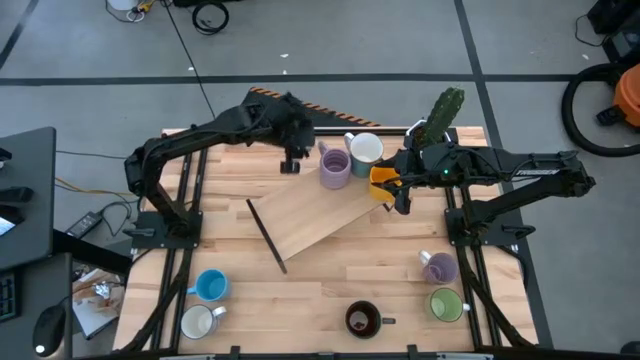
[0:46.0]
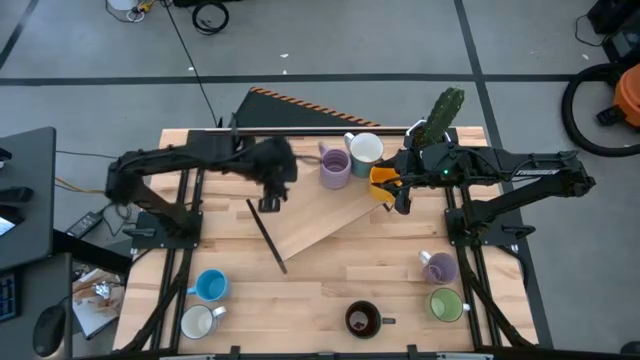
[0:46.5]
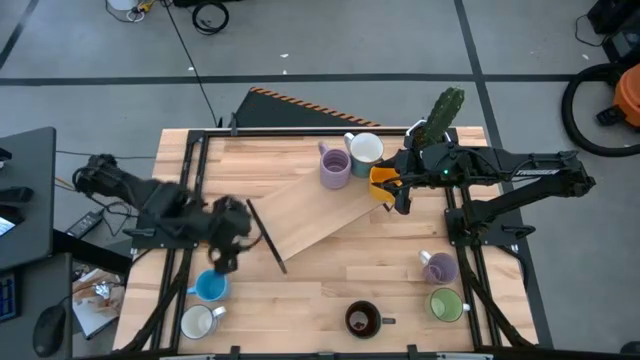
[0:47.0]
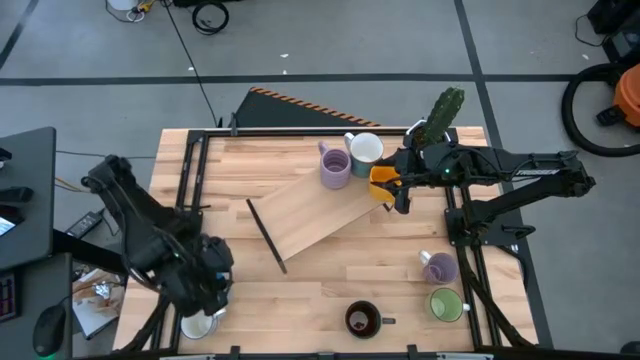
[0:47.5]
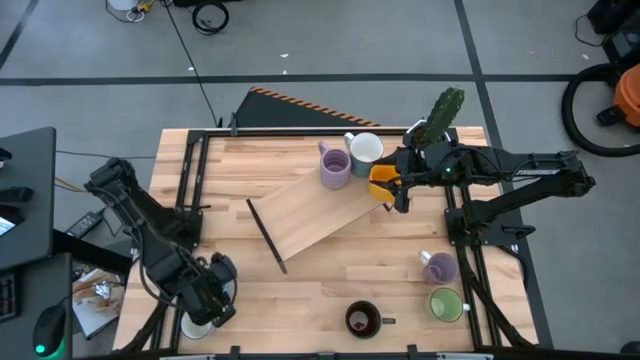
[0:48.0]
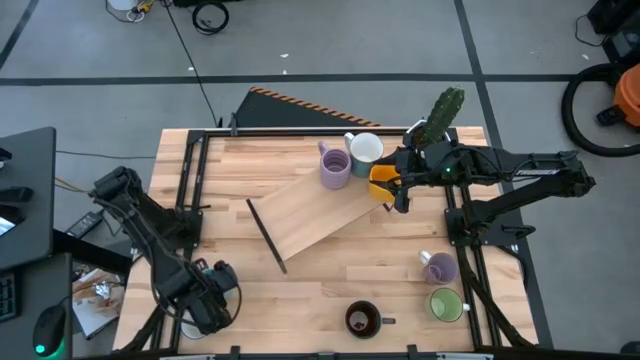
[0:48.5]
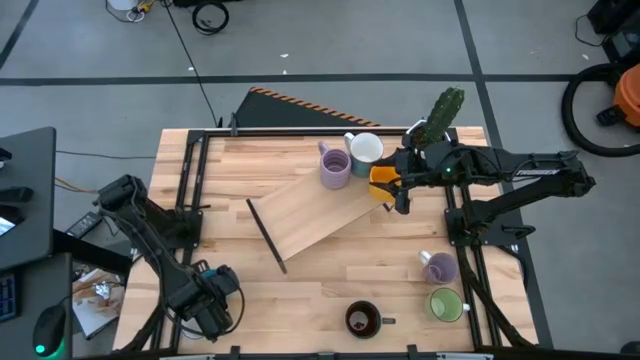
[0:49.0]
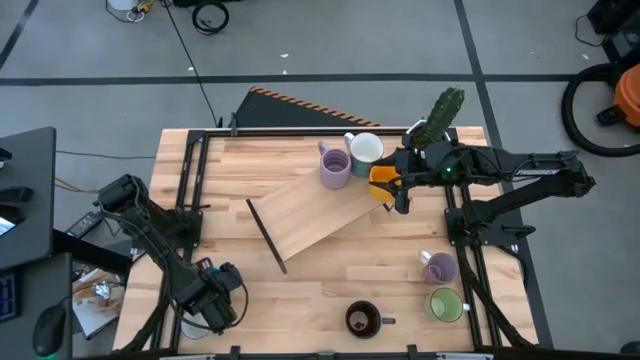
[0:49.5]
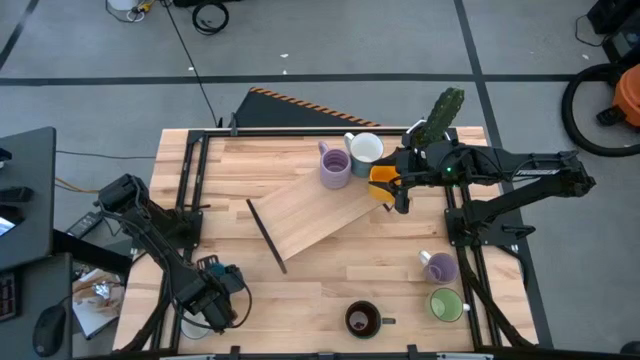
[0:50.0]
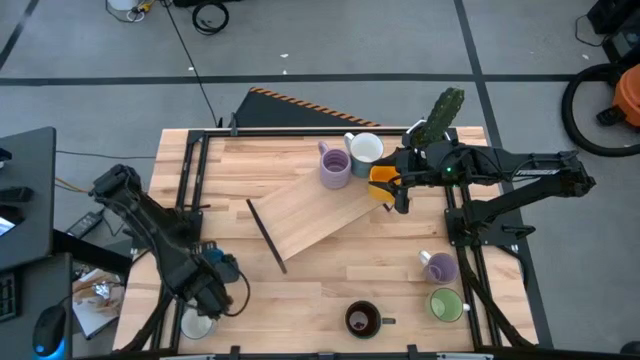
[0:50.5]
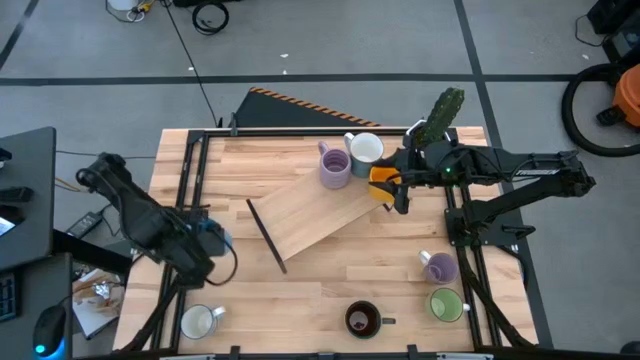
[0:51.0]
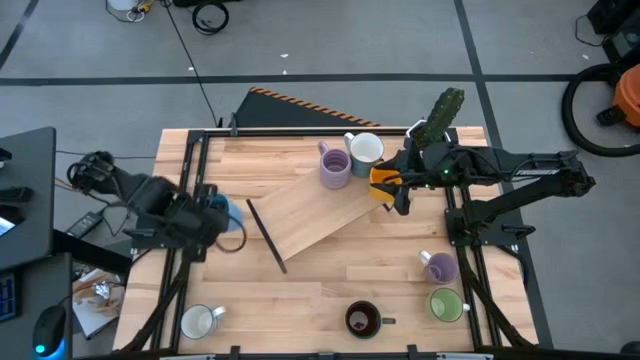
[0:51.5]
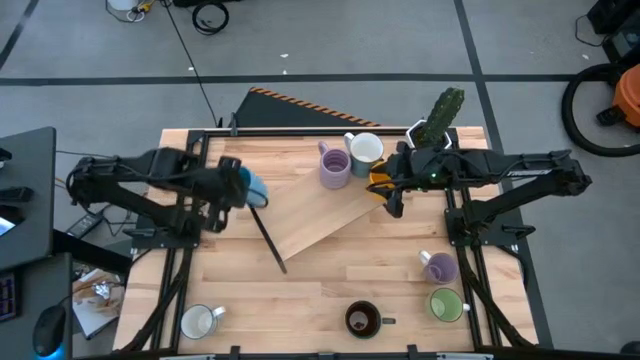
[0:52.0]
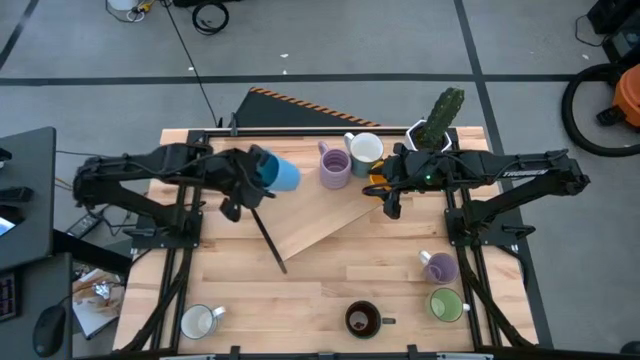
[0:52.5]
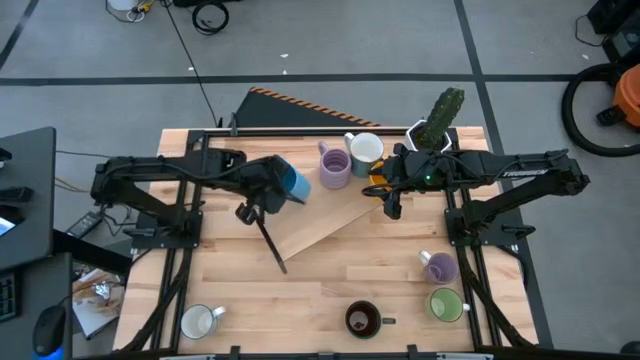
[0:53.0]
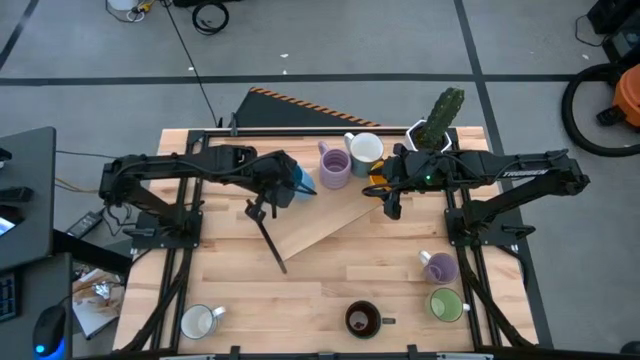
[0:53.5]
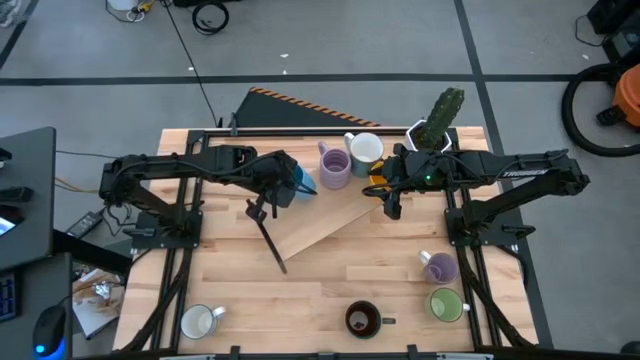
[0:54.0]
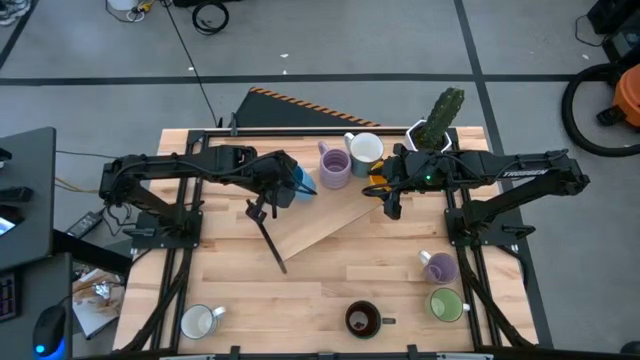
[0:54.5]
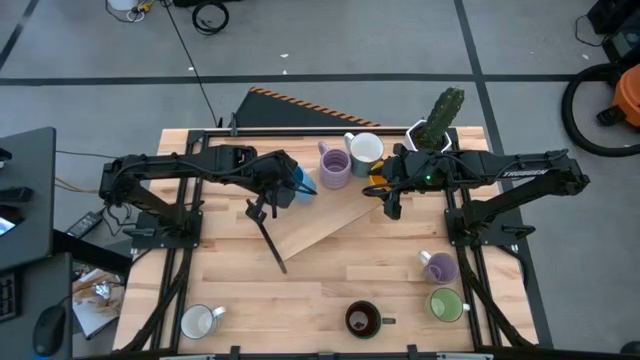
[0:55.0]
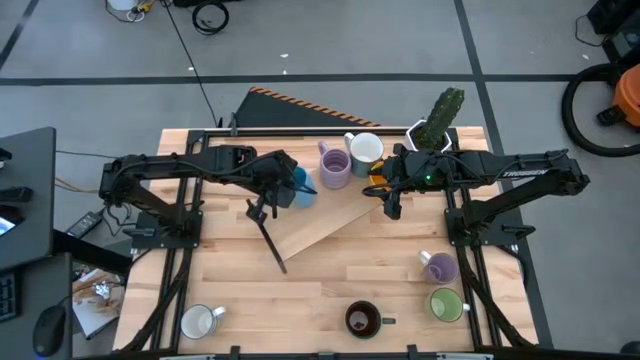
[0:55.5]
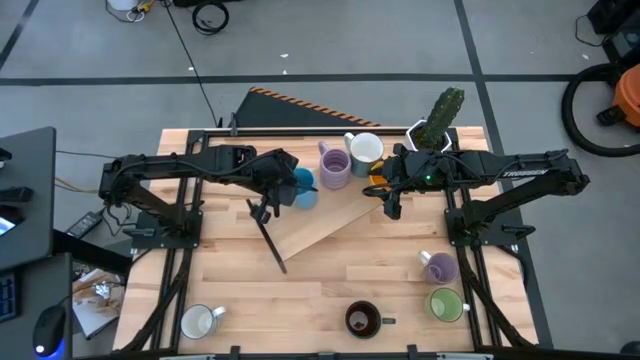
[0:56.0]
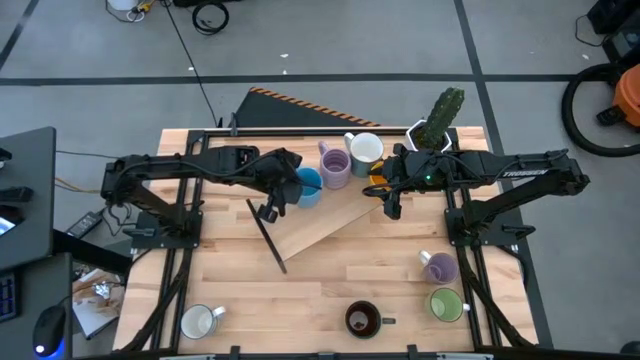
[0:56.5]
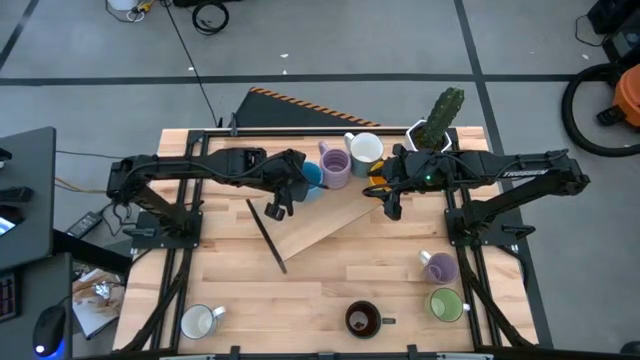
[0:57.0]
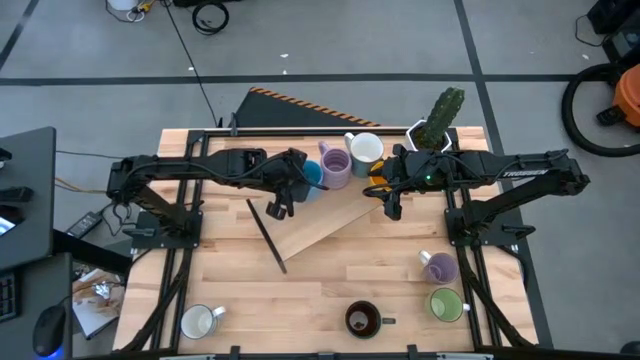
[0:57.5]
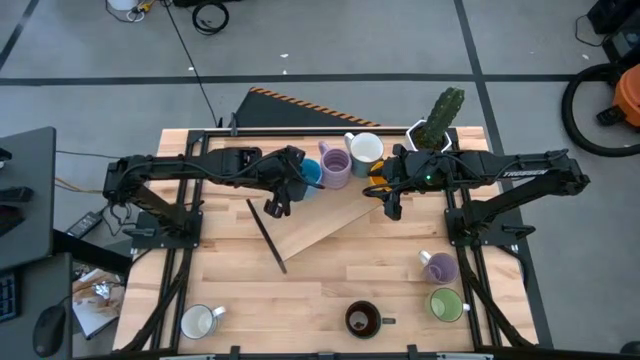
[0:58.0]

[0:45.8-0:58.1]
Task: Place coffee mugs
Put the blue mug on the shelf

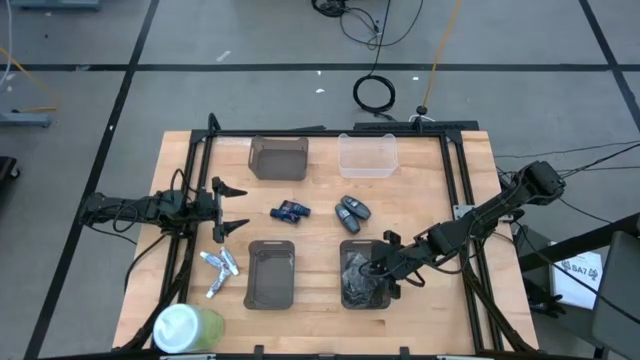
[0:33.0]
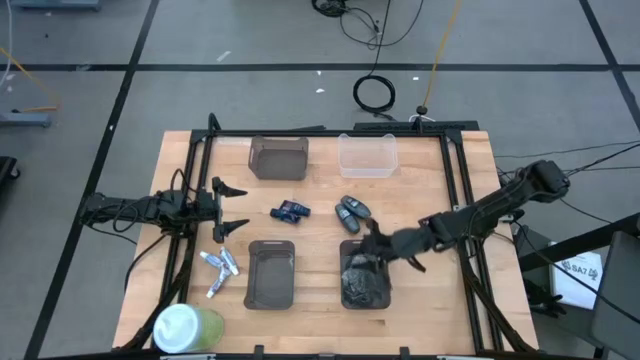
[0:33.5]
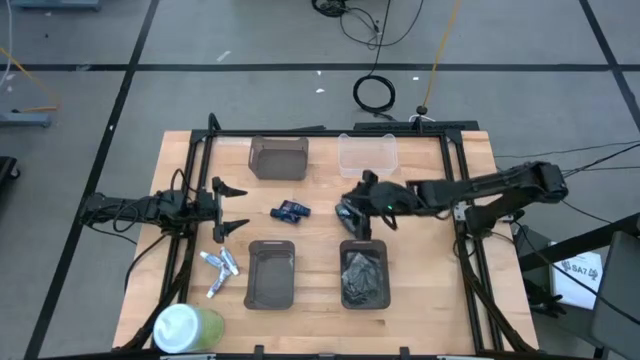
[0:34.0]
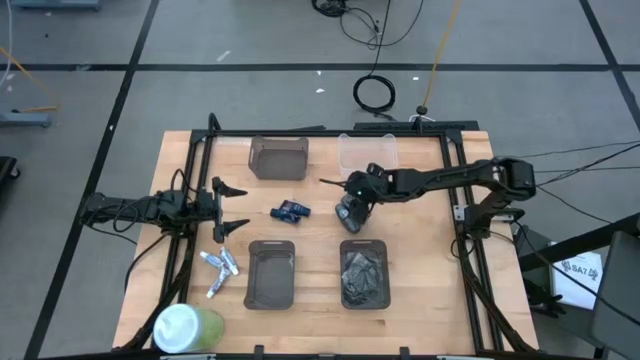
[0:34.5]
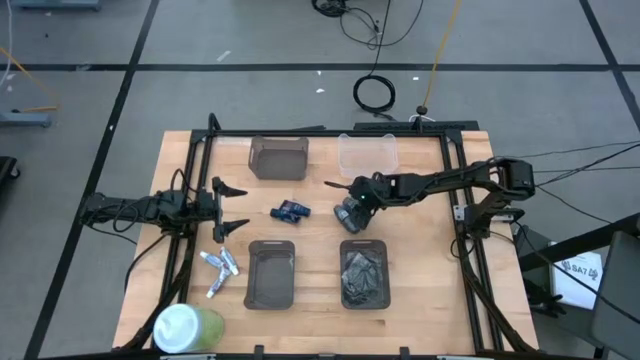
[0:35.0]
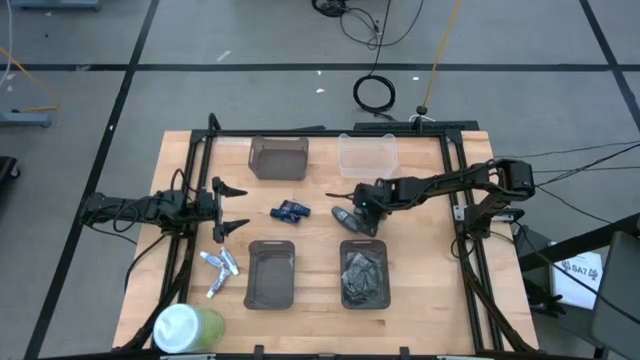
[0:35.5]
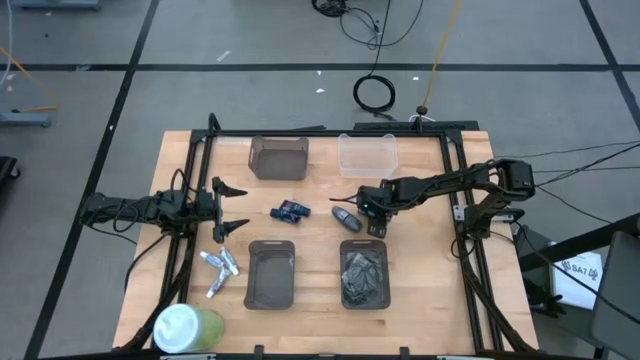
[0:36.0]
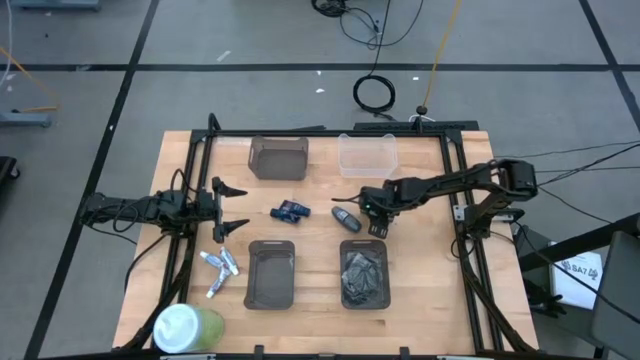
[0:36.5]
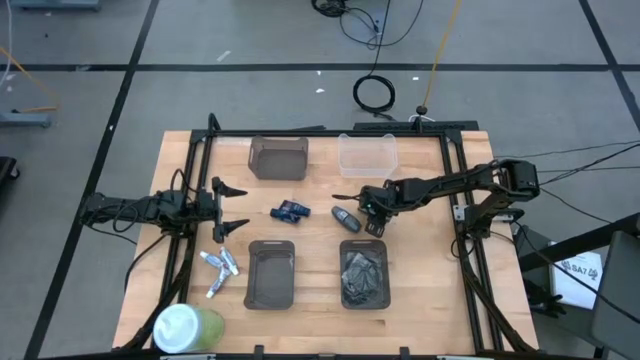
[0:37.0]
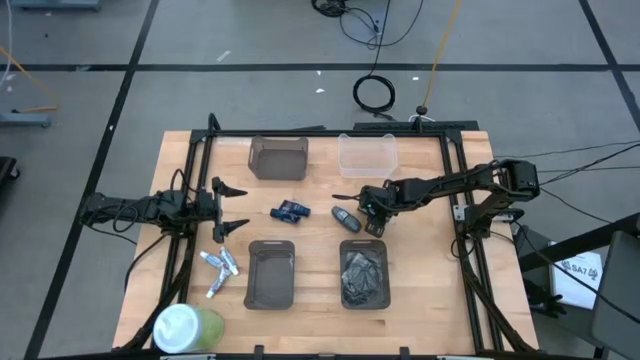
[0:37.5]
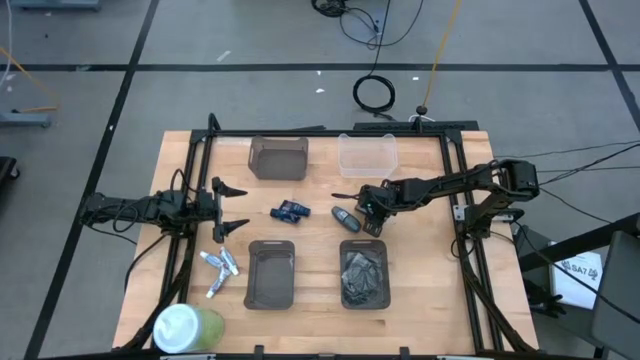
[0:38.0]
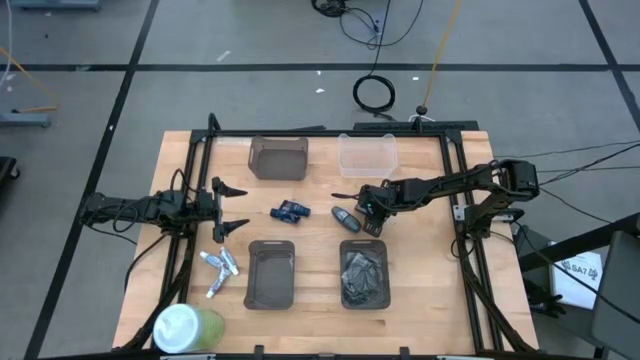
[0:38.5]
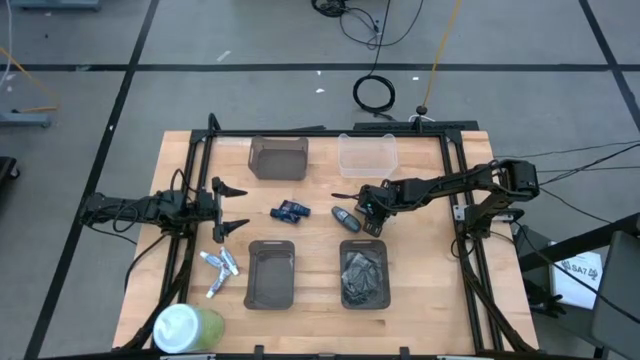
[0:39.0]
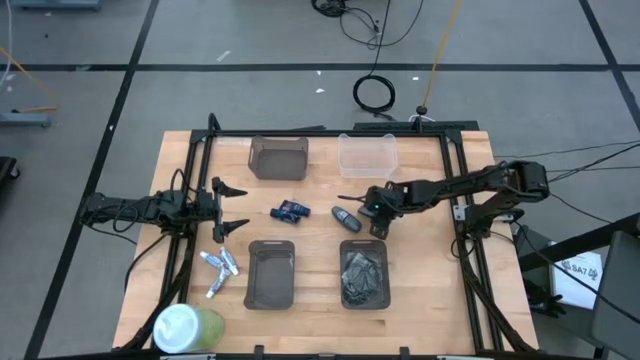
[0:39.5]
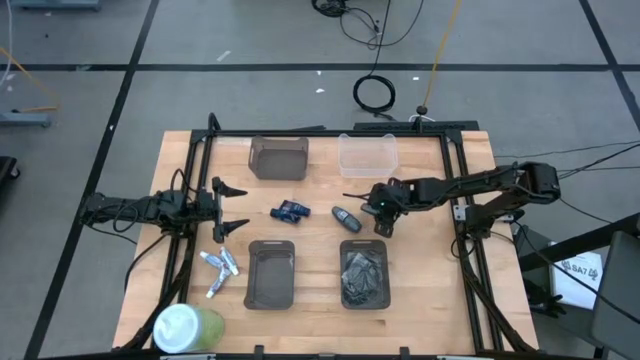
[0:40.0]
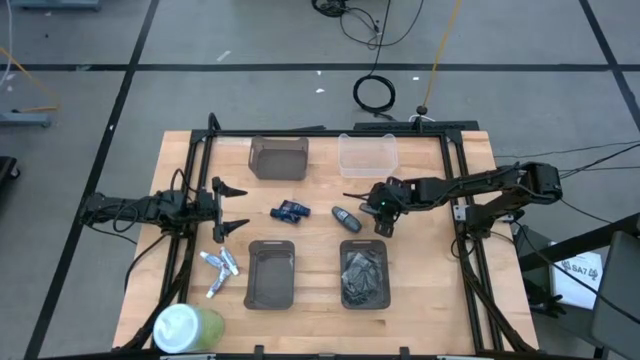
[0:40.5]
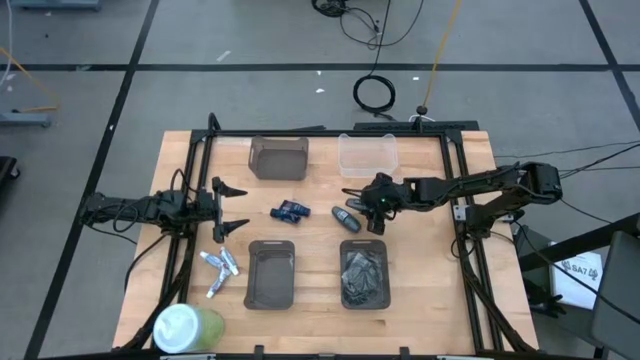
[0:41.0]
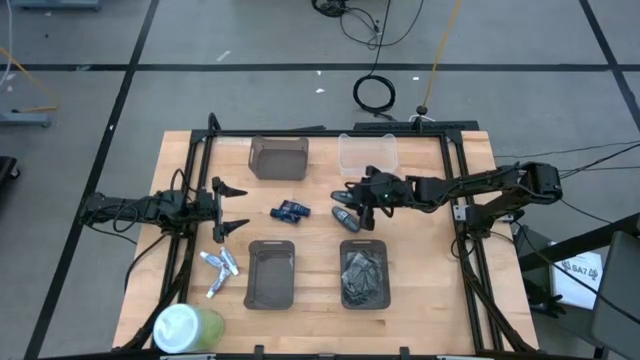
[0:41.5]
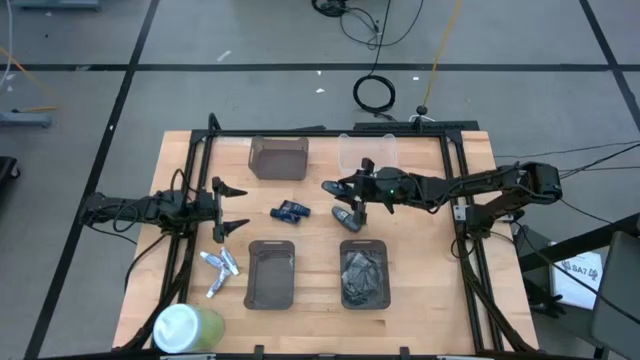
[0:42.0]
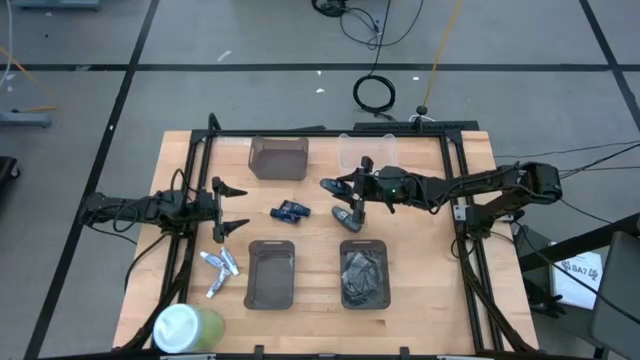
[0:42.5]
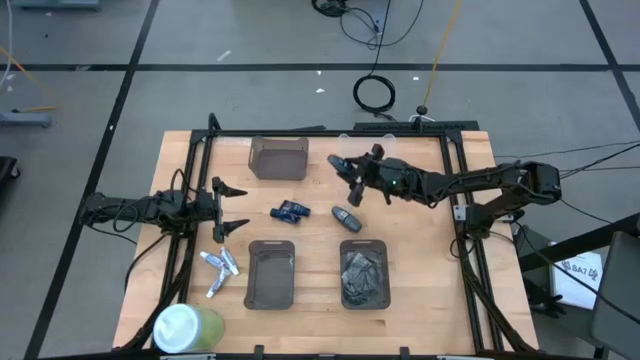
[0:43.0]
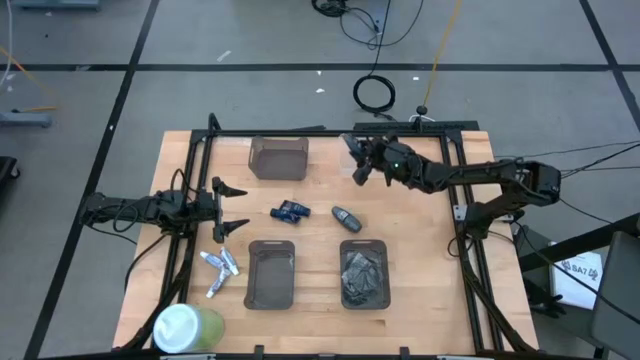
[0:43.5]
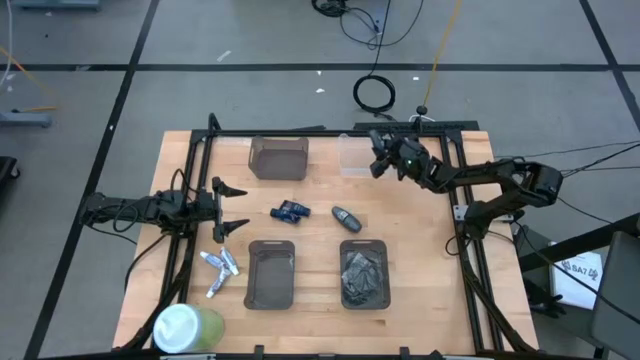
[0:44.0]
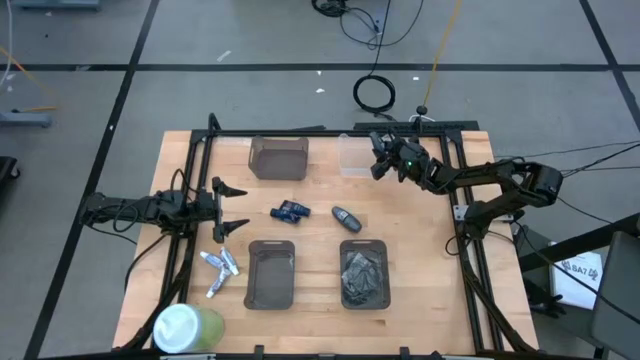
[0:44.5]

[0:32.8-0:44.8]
Task: Pick & Place Travel size toiletries
Put the right gray deodorant into the transparent bin
